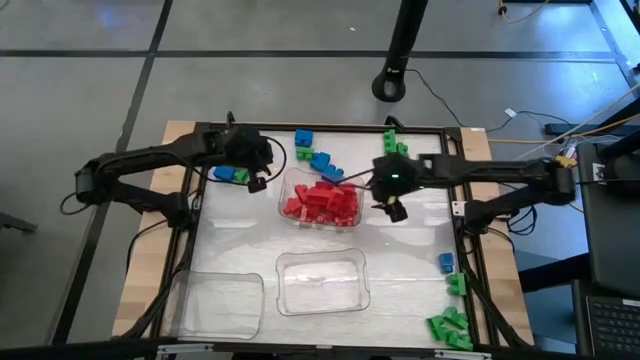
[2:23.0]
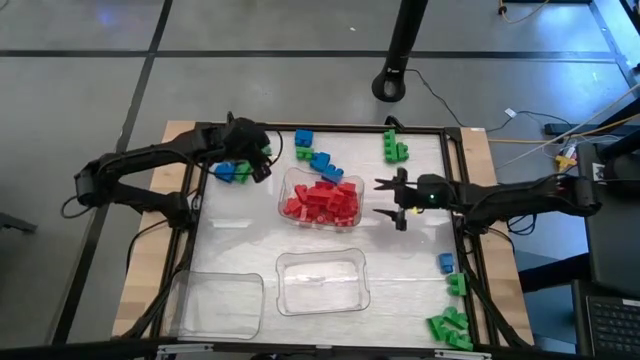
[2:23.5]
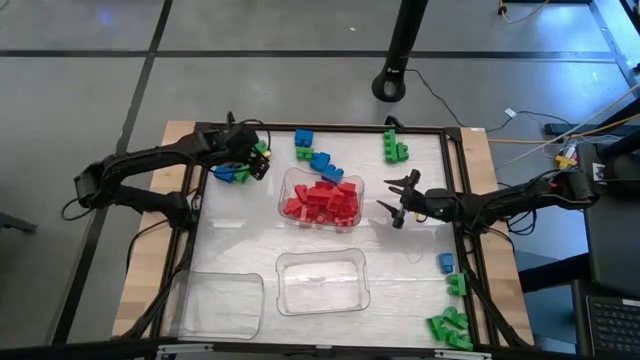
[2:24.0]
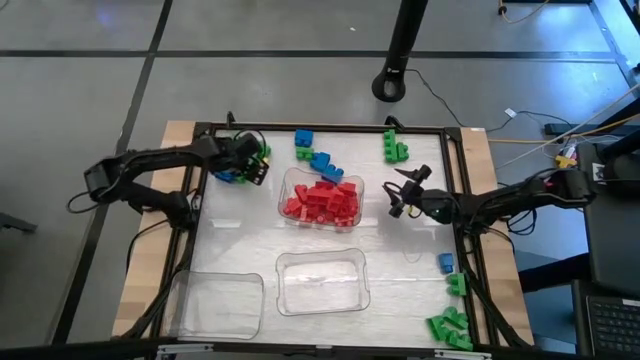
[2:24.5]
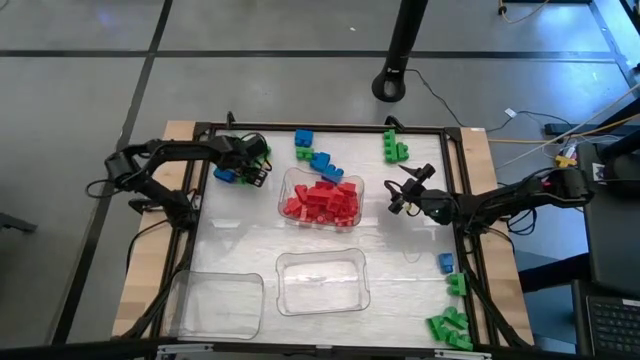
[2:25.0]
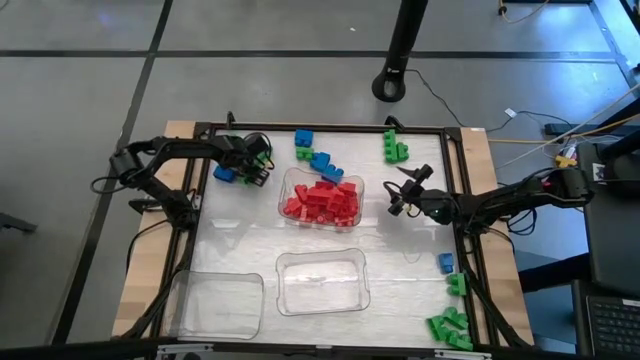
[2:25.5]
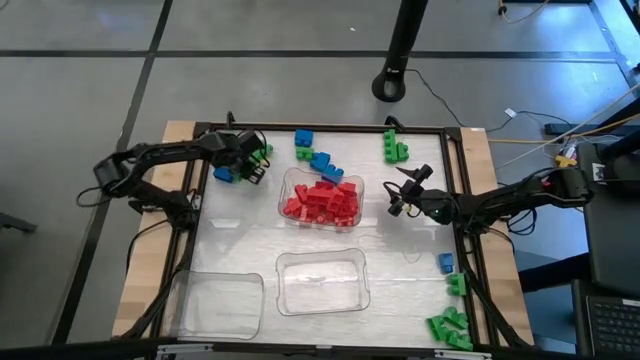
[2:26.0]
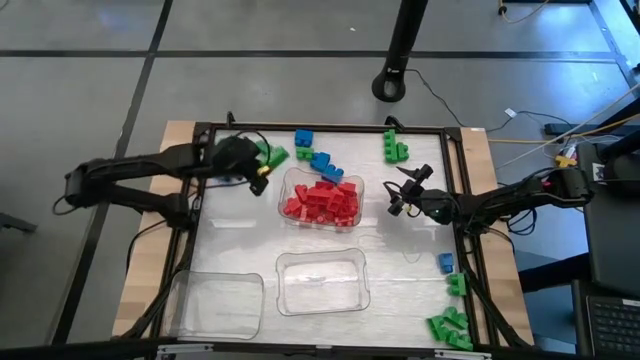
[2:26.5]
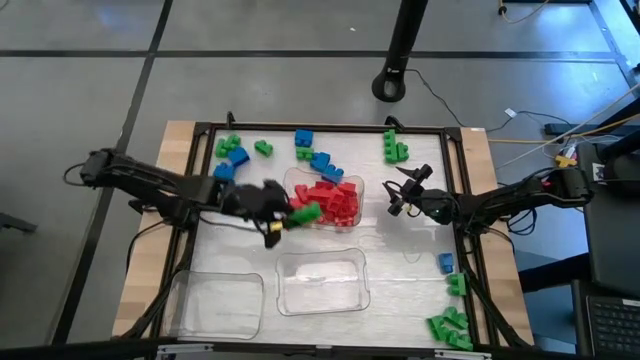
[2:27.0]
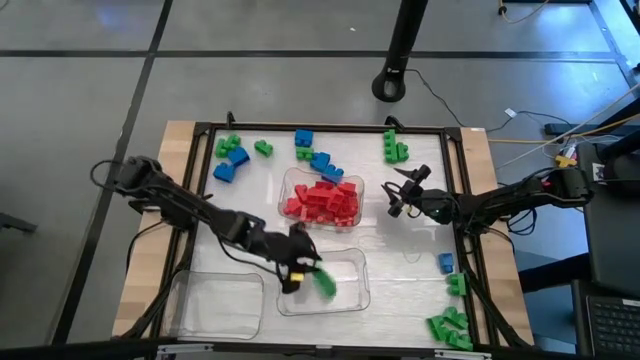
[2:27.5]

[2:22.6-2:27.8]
Task: Sort blocks
Put the green game piece into the bottom right transparent bin

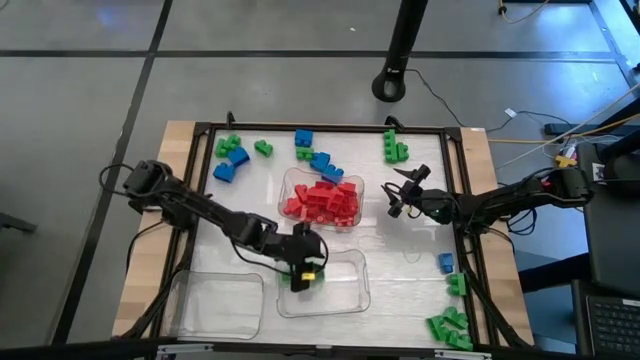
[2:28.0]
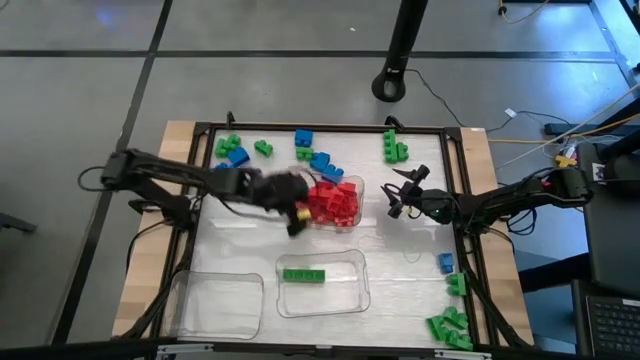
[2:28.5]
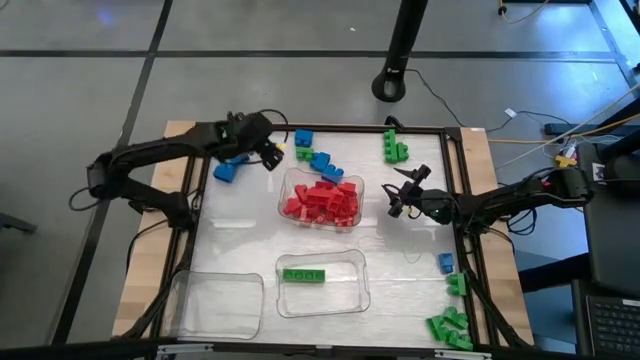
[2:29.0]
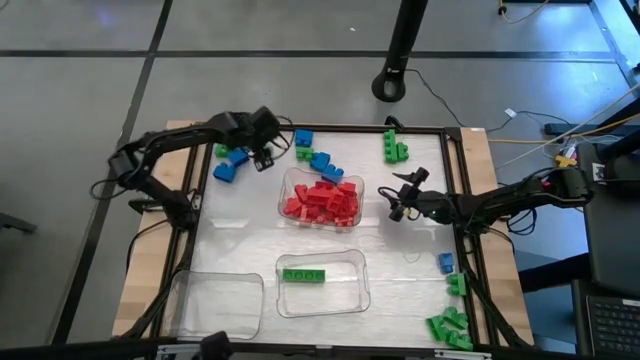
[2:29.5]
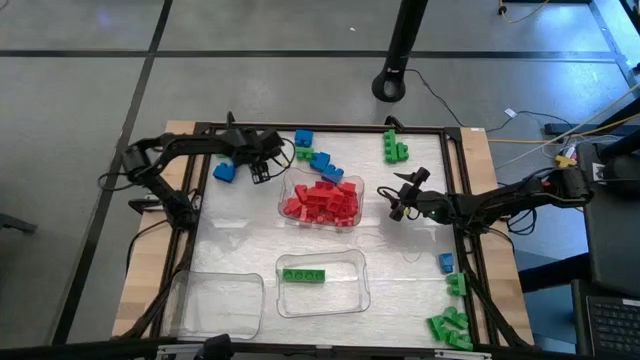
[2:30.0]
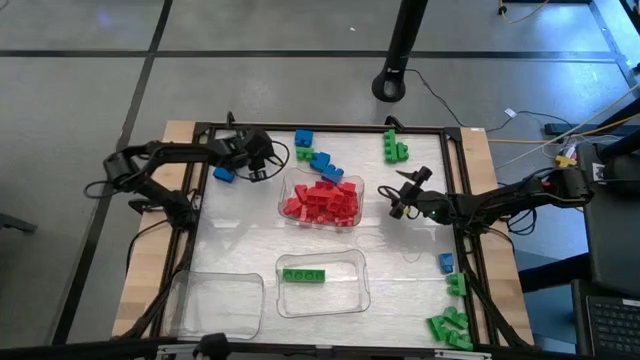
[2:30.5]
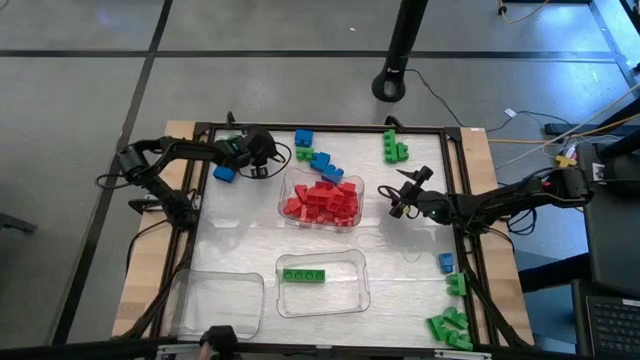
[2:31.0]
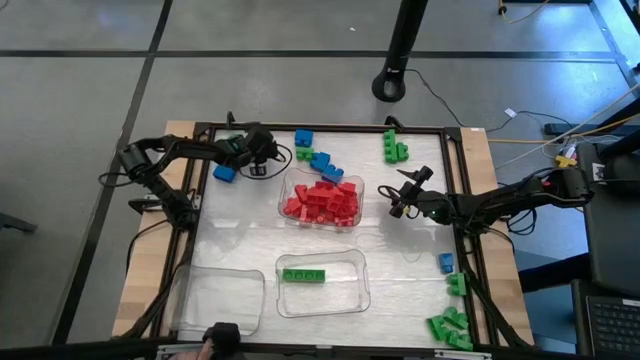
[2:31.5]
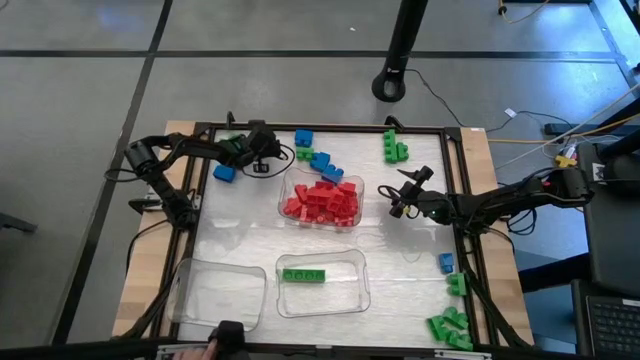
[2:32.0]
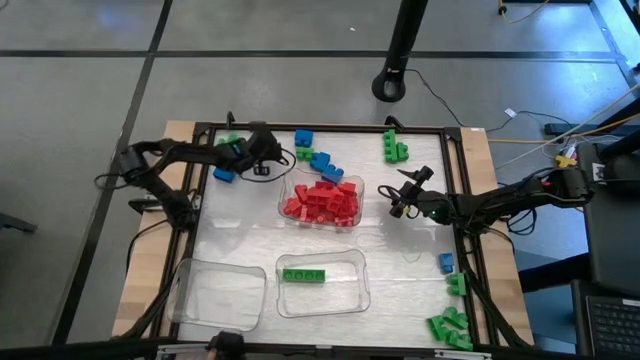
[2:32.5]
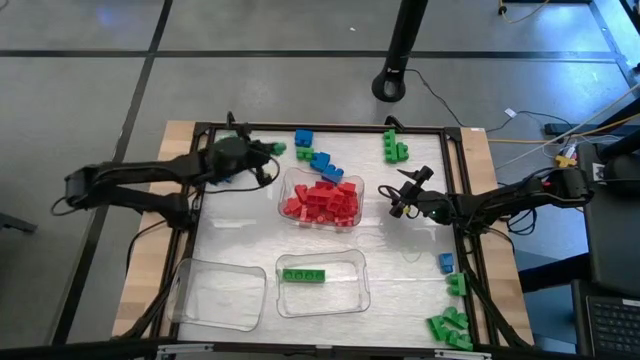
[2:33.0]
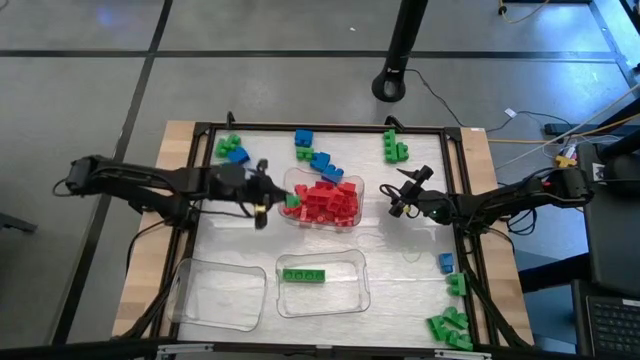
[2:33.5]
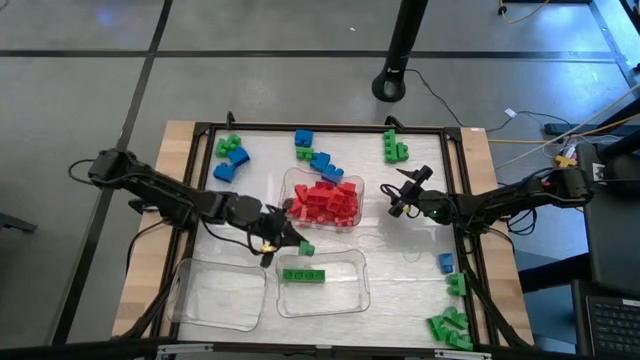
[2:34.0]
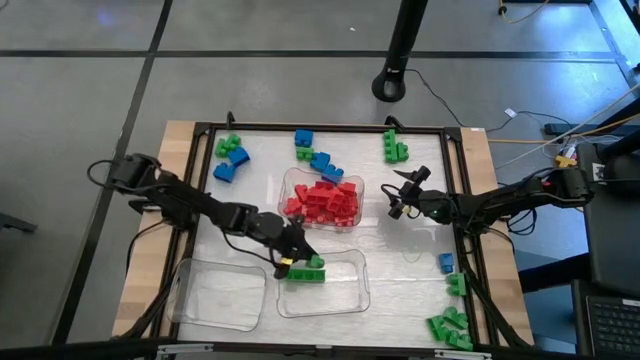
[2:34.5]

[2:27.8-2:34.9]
Put the green game piece into the bottom right transparent bin

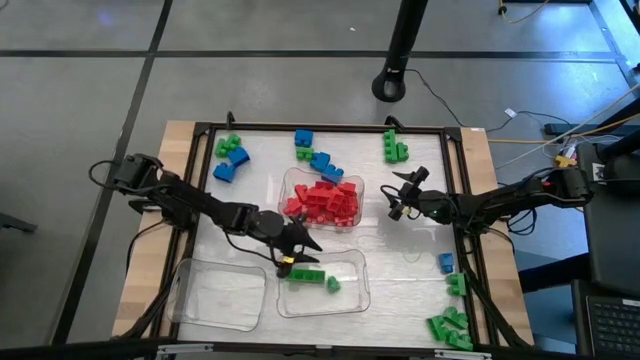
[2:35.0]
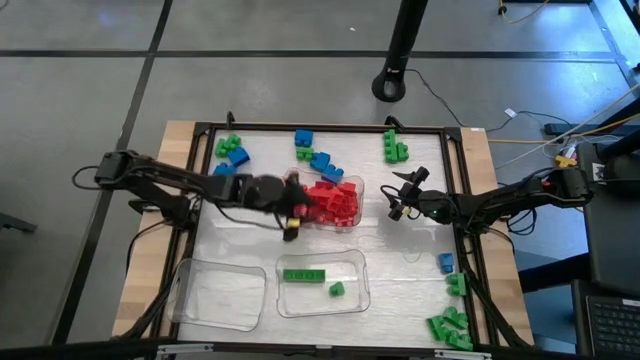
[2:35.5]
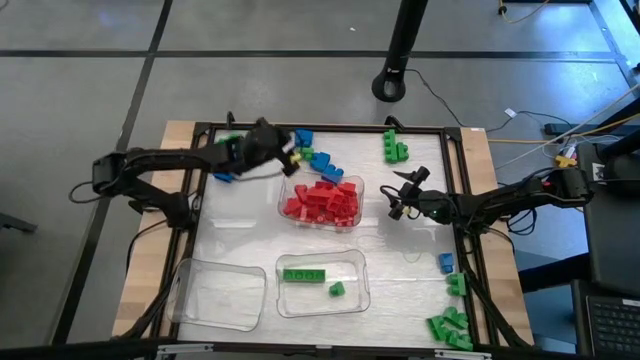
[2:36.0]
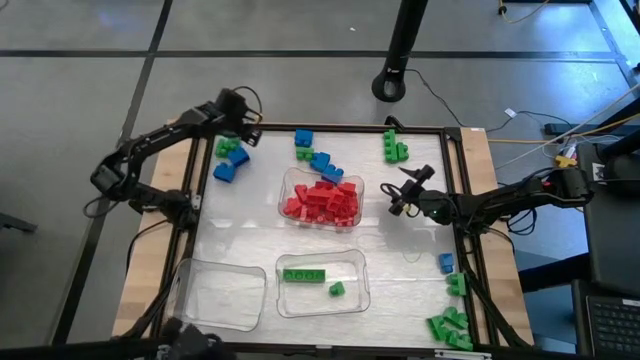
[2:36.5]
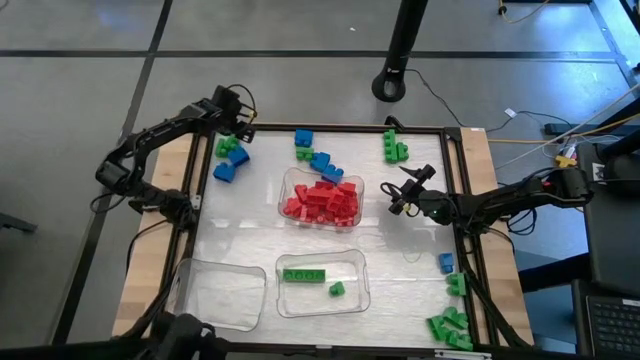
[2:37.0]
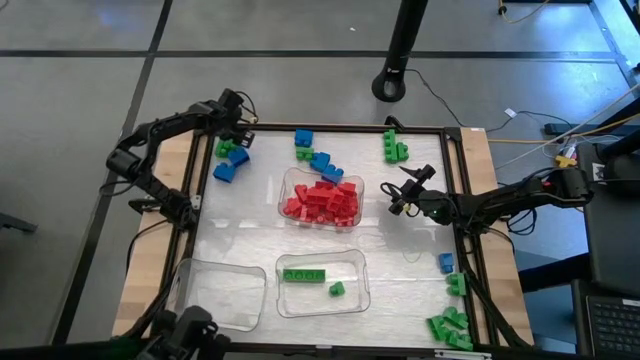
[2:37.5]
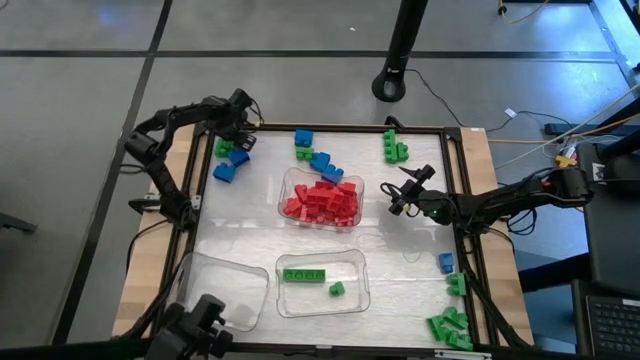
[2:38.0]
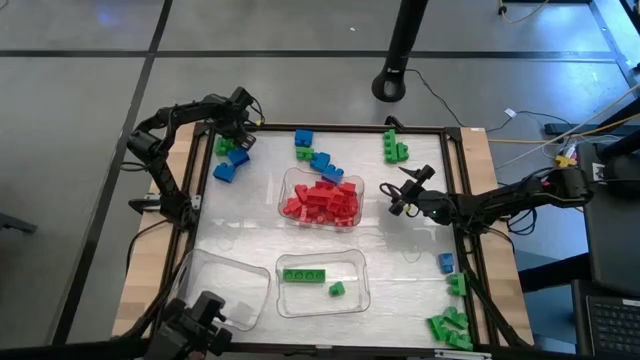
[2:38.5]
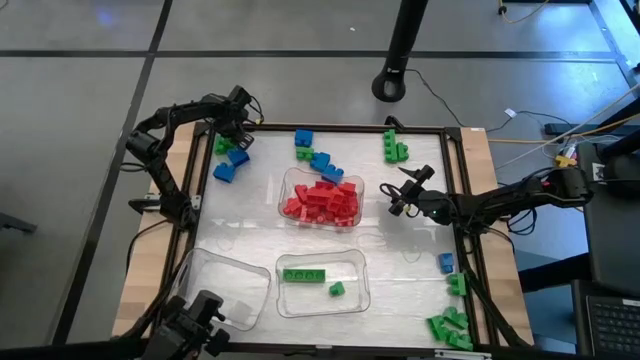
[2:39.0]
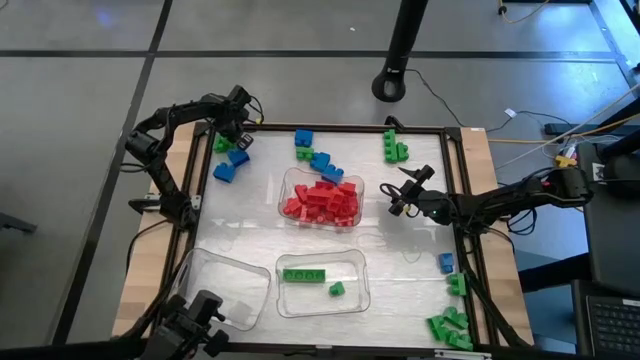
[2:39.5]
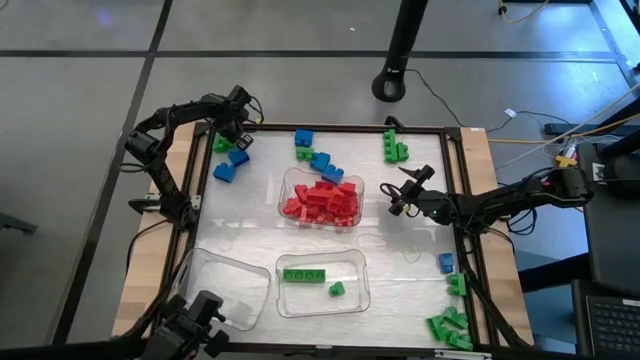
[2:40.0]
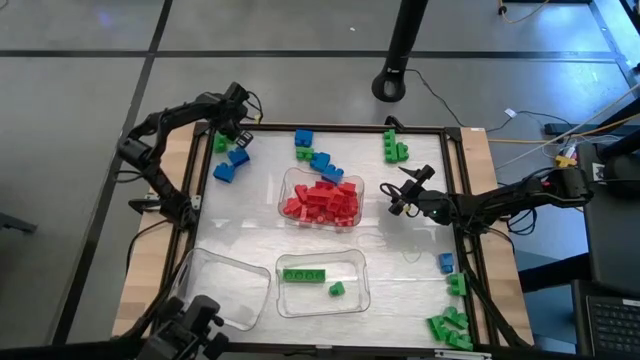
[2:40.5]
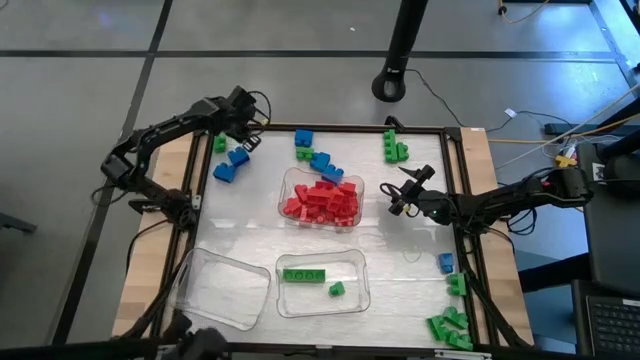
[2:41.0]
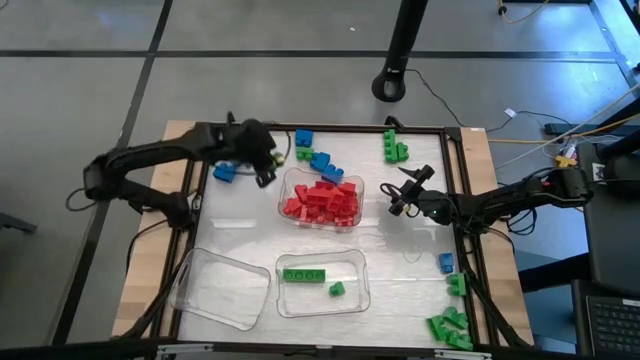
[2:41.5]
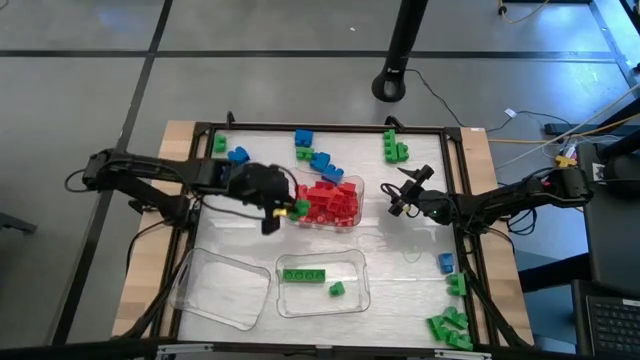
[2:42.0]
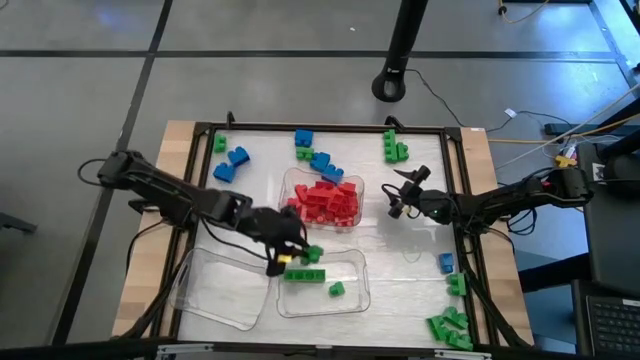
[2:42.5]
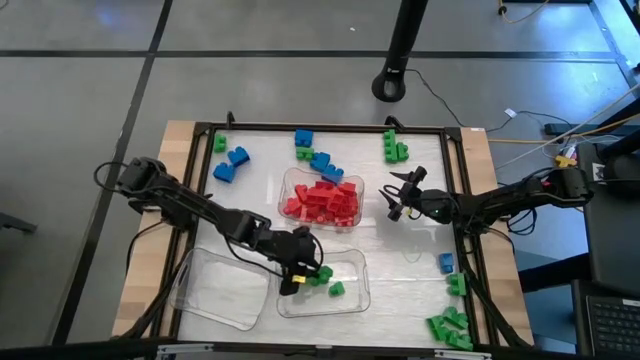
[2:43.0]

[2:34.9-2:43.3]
Put the green game piece into the bottom right transparent bin
